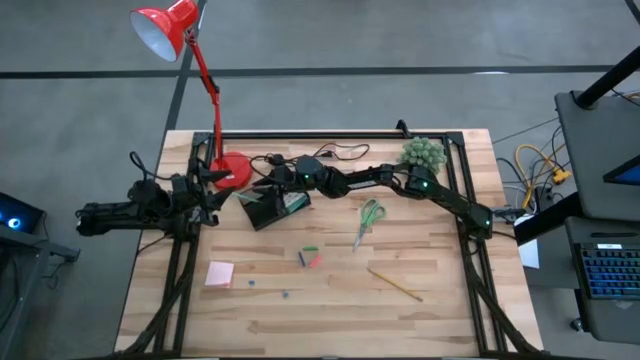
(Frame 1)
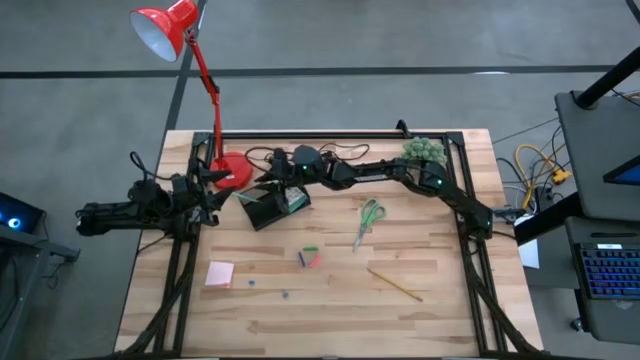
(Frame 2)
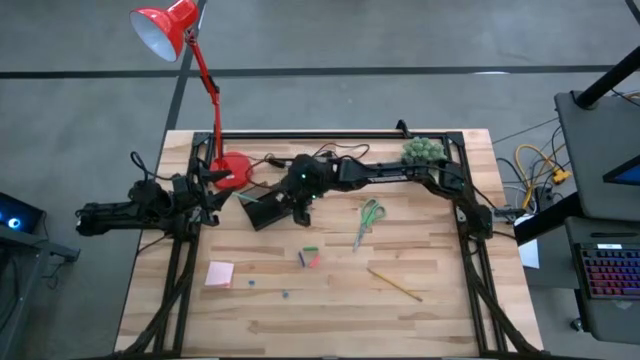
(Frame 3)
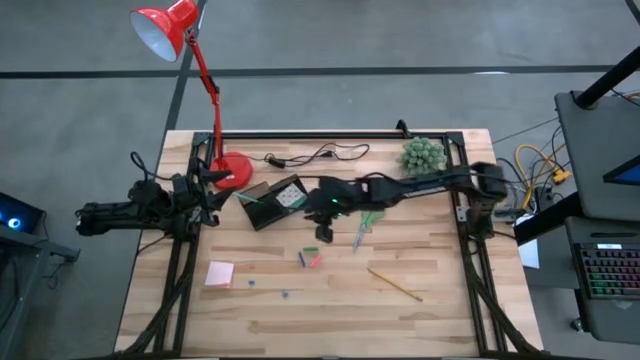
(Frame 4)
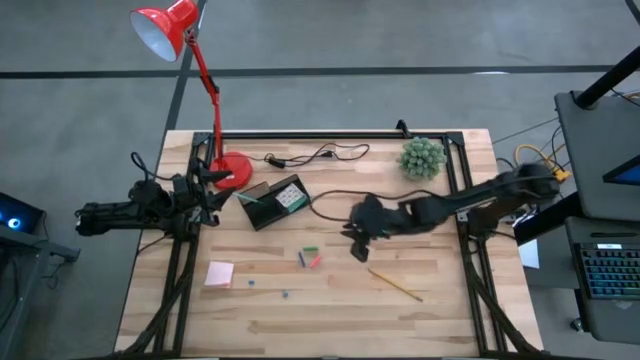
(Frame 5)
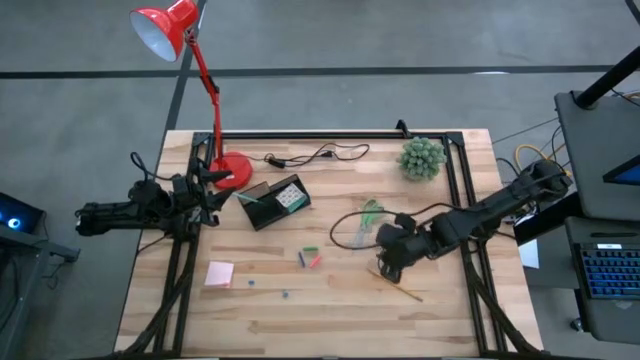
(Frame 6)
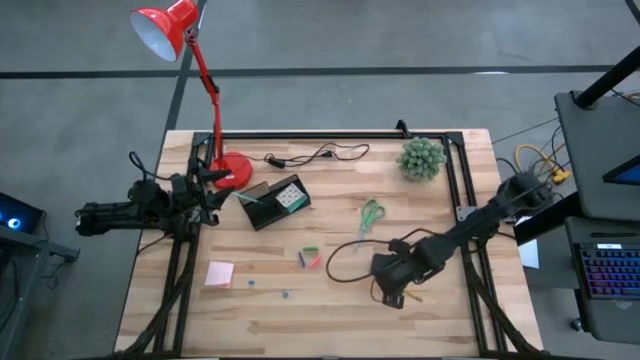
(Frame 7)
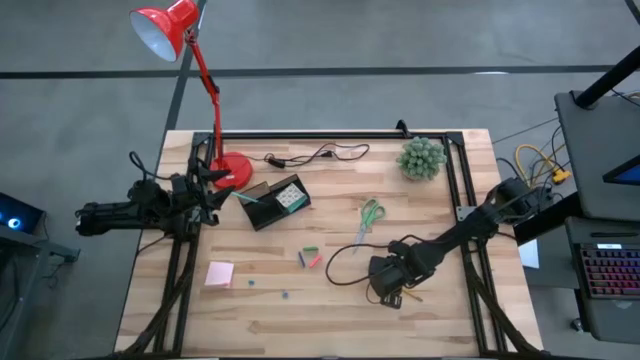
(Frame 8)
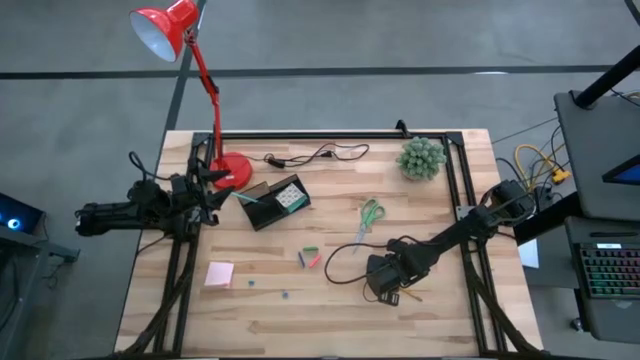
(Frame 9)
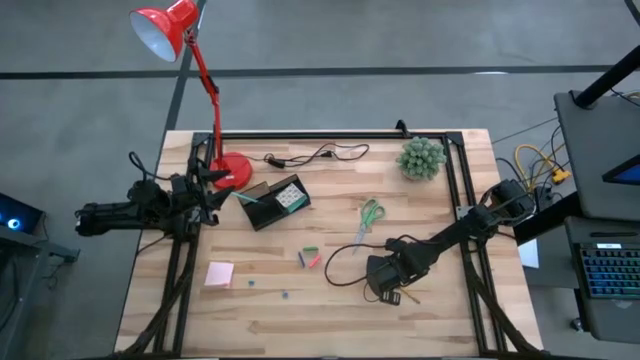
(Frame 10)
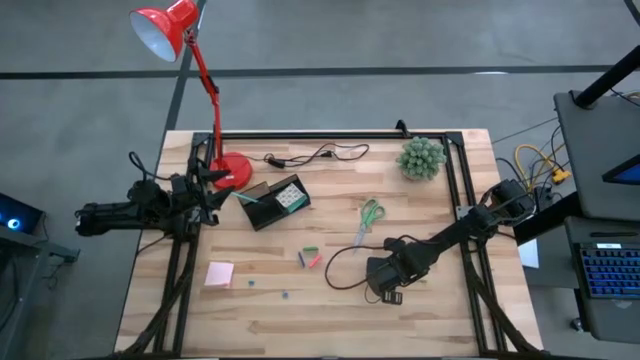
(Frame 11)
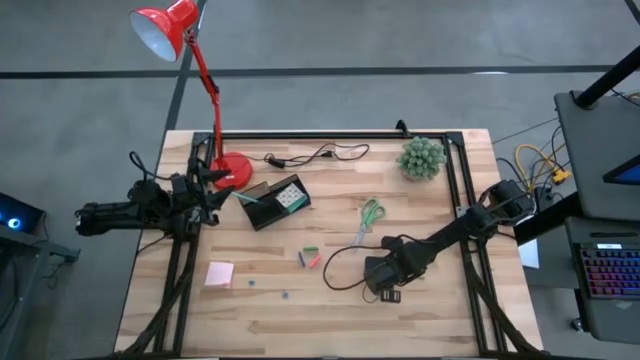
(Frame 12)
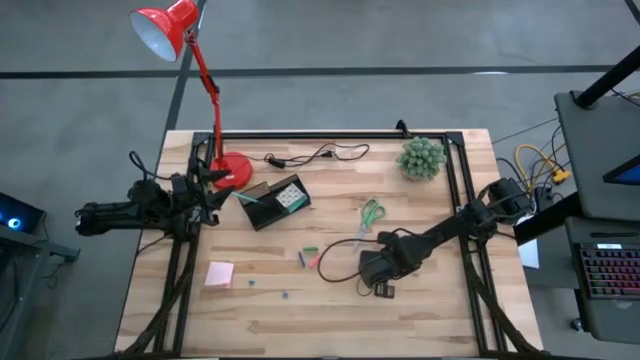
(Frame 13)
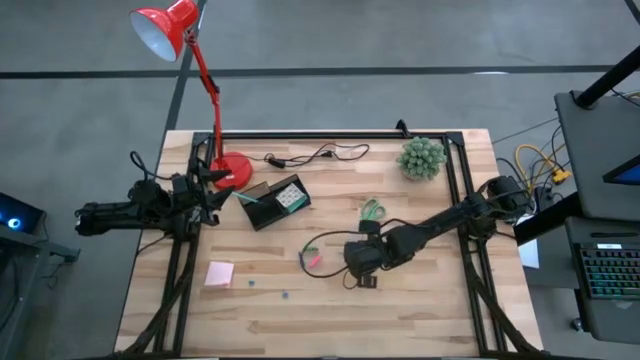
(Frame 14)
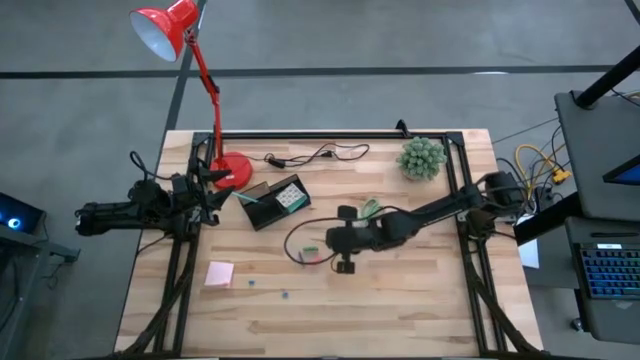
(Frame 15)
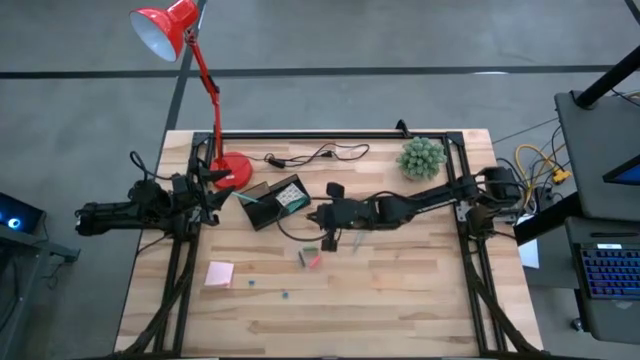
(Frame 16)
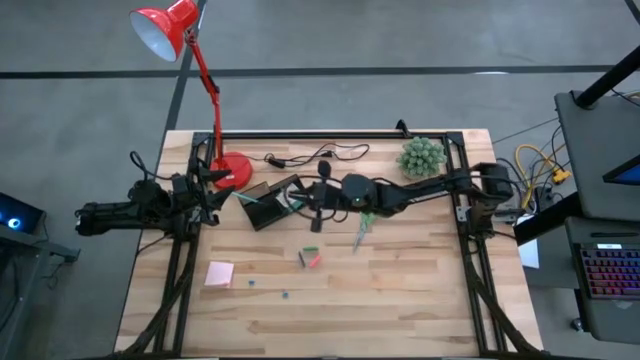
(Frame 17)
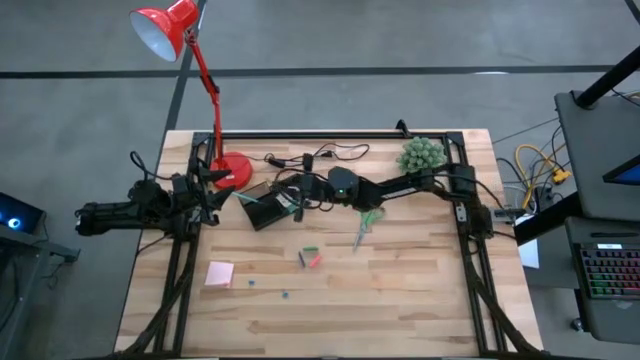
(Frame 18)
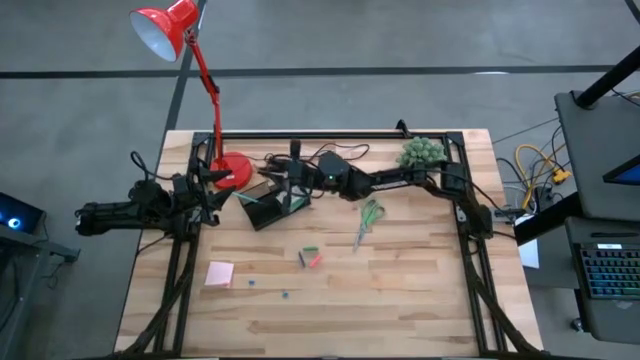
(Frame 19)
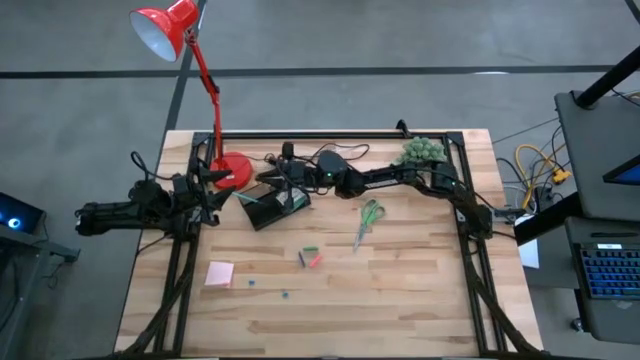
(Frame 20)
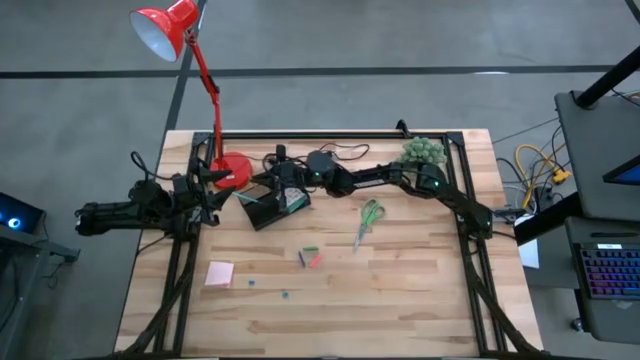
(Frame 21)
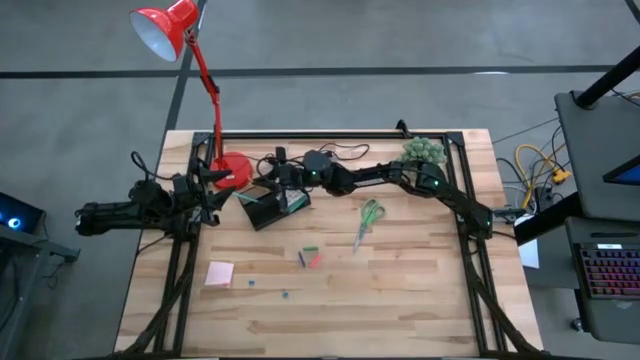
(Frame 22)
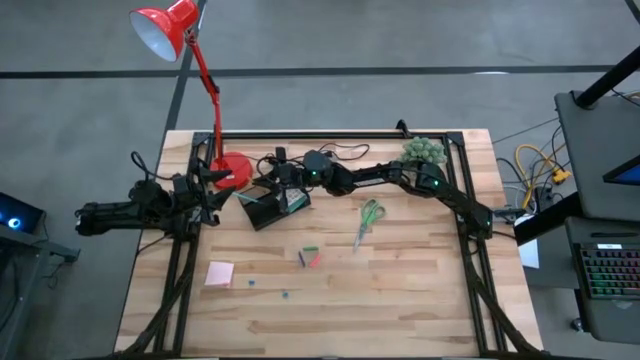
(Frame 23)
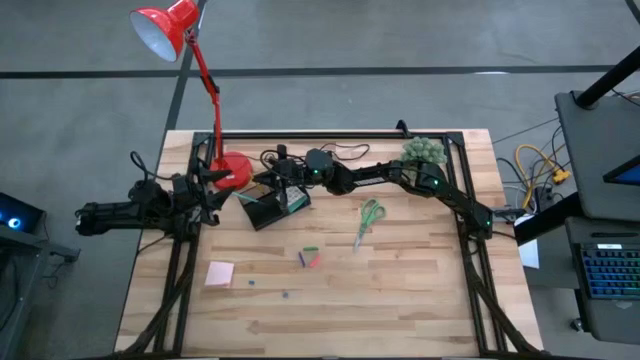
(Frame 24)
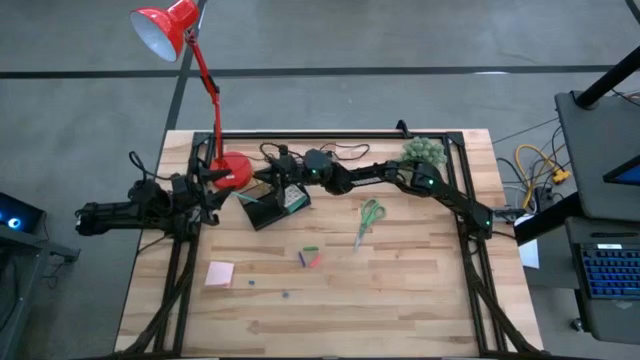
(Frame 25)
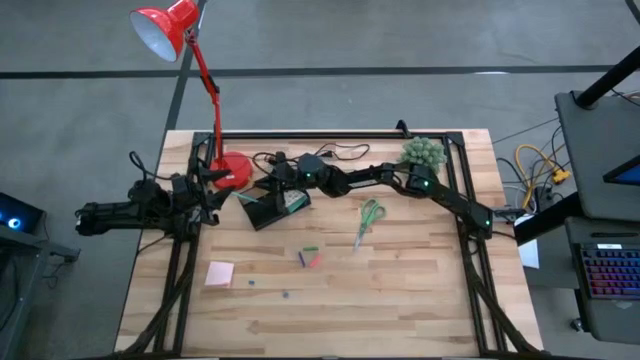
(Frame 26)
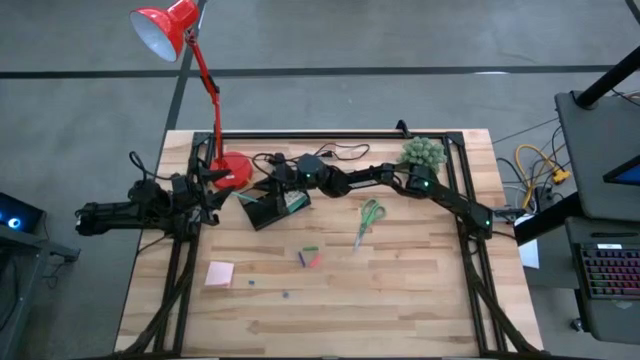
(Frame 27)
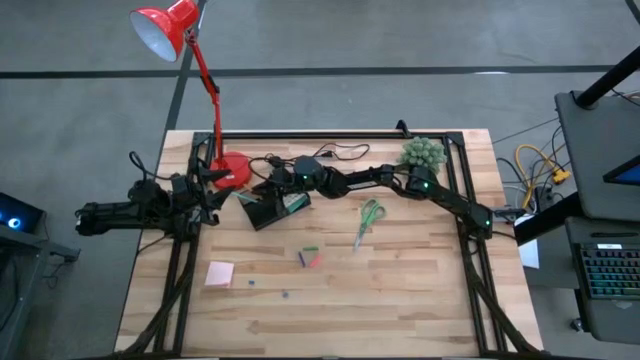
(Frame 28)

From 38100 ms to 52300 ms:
Task: Pick and place office supplies into organizer
Put the yellow pencil into the desk organizer

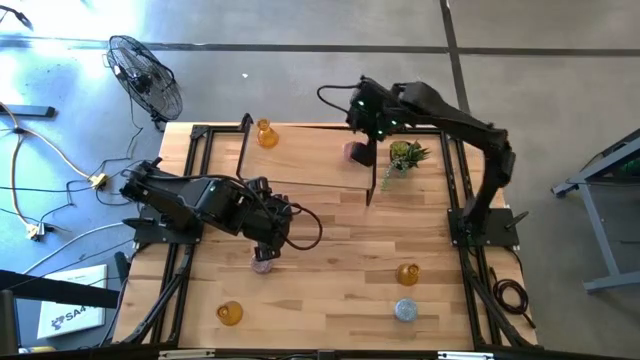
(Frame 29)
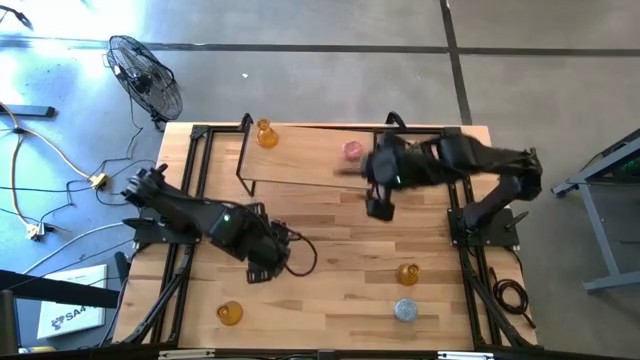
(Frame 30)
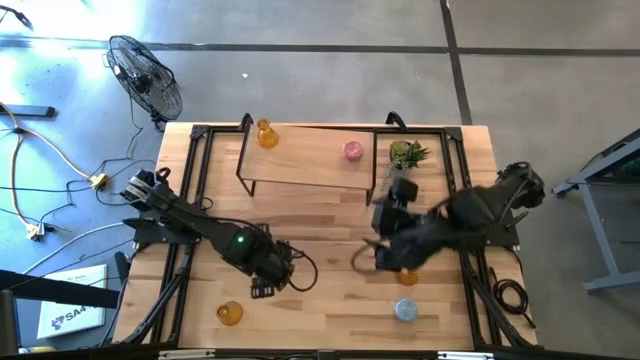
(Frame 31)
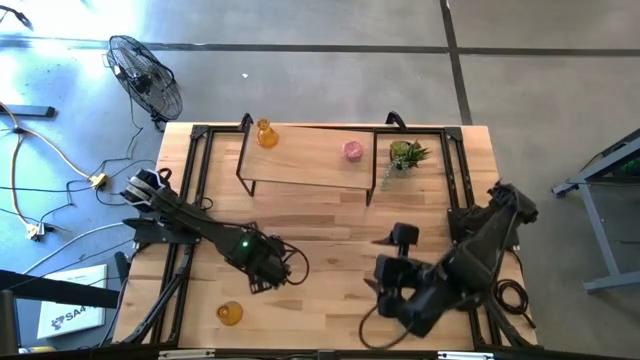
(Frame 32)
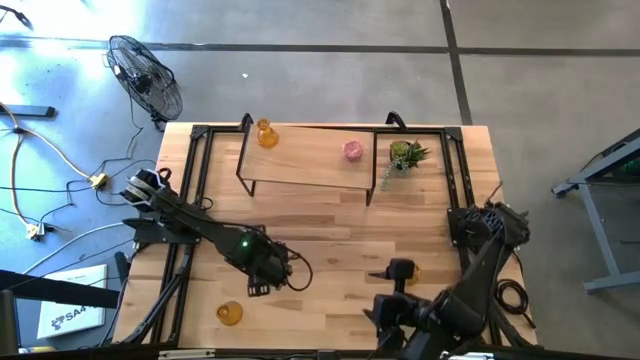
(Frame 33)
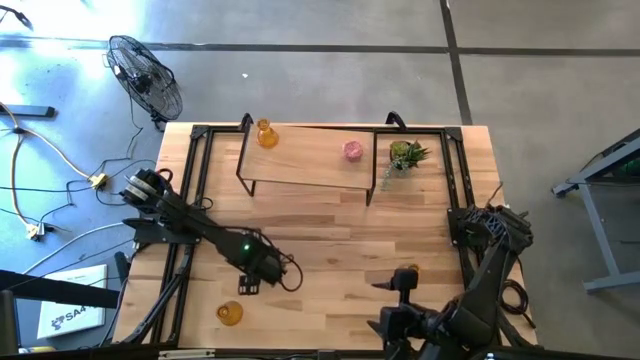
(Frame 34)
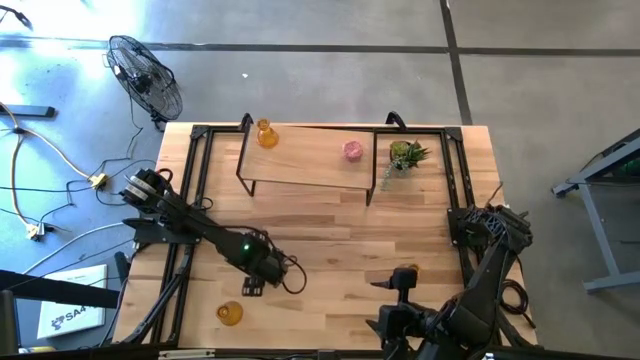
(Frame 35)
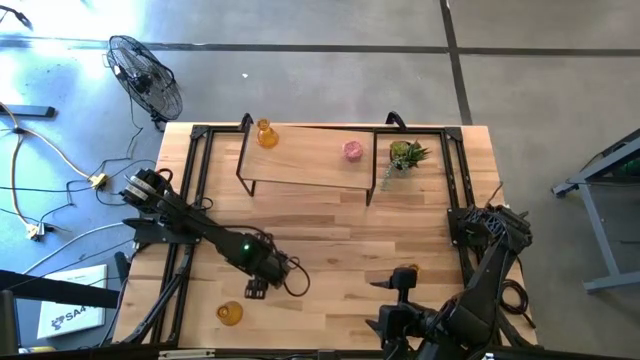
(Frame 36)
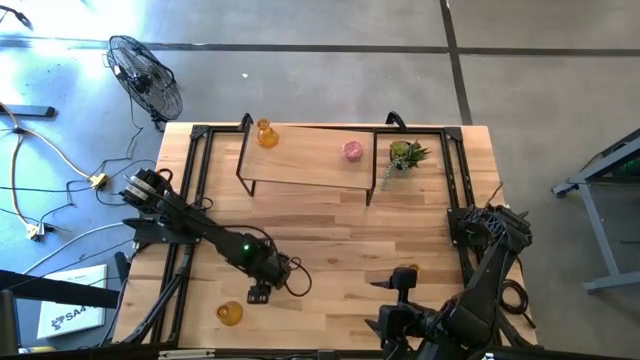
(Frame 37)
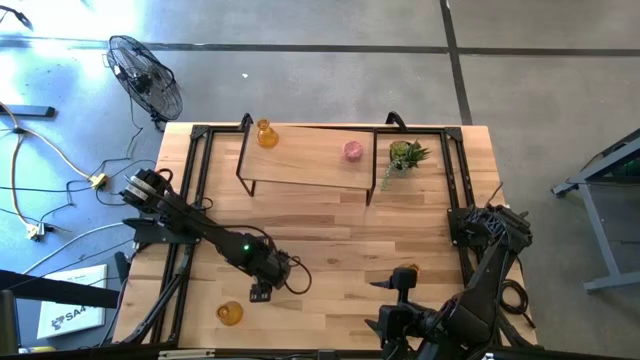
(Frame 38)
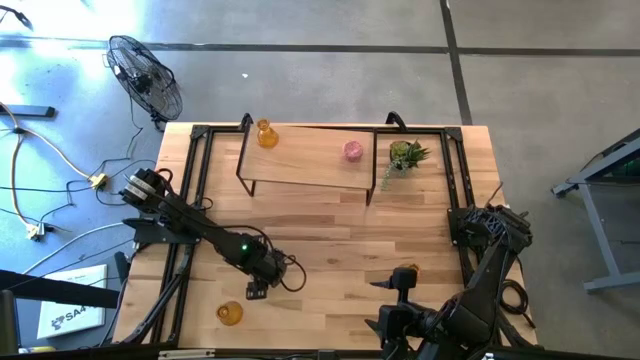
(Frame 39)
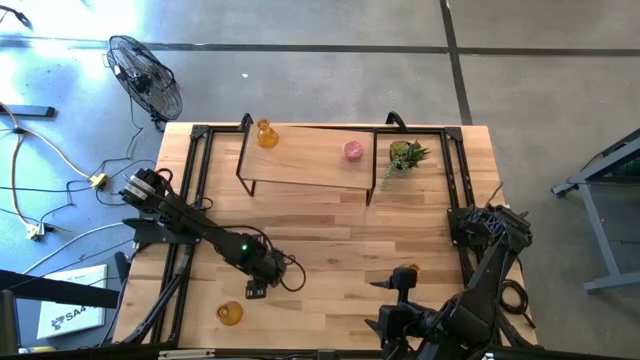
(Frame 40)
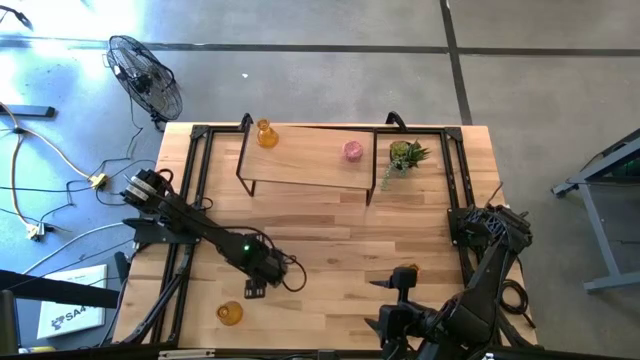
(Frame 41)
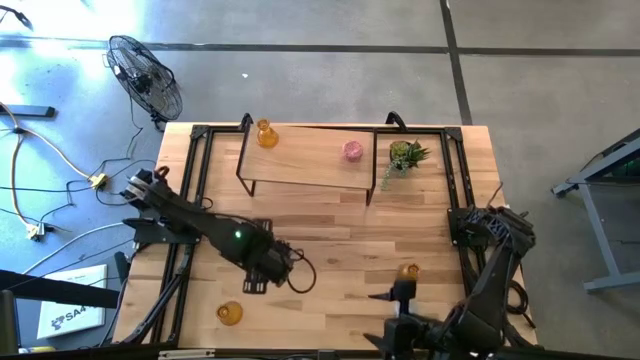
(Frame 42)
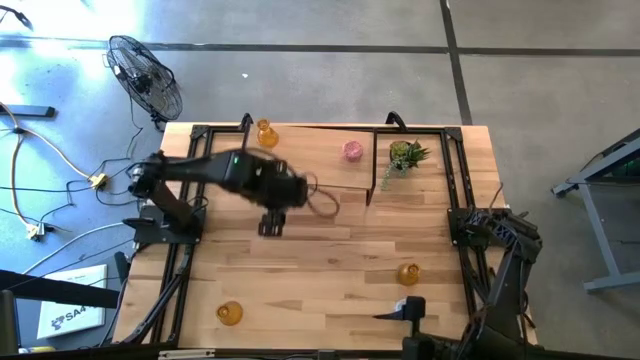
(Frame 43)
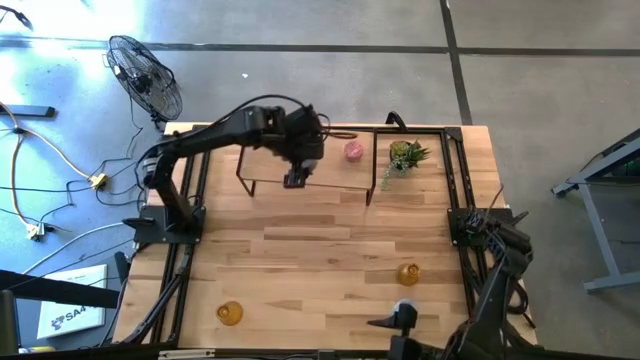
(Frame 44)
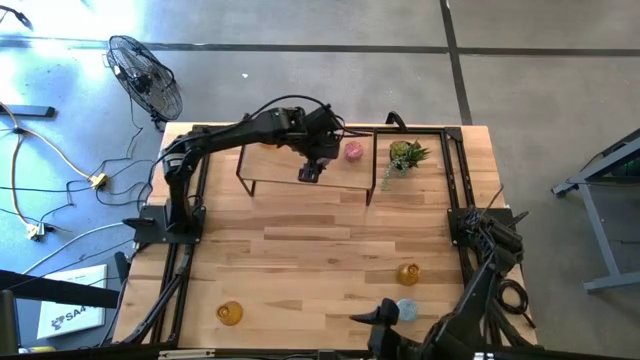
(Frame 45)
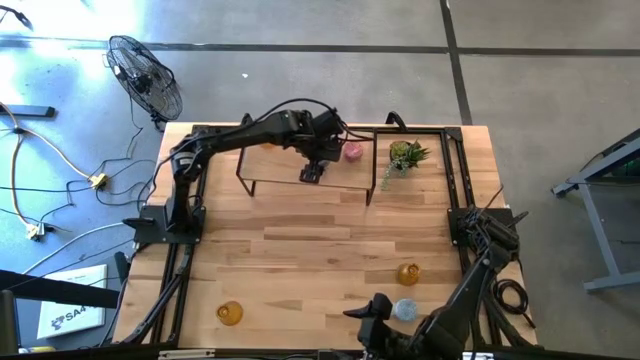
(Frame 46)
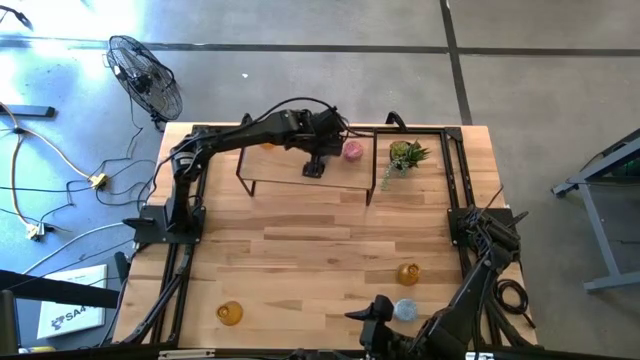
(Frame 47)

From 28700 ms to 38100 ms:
Task: Pick & Place candle stick holders
Put the red scented candle on the shelf
